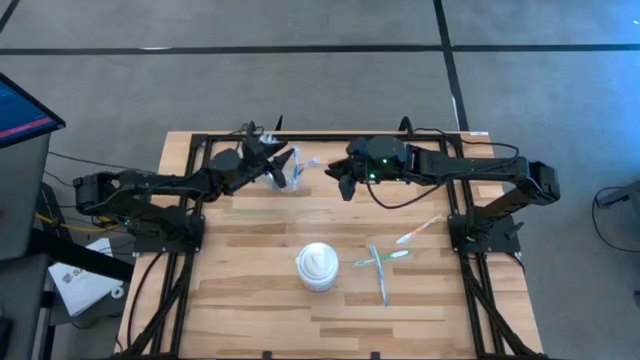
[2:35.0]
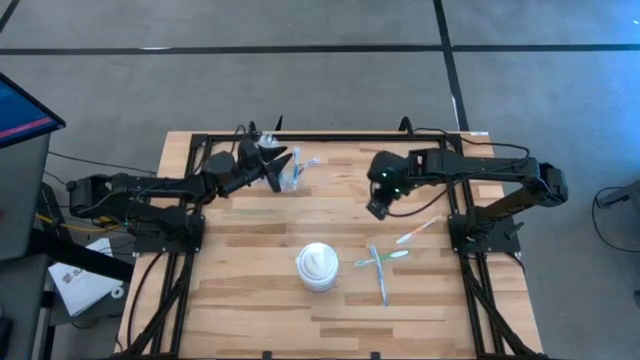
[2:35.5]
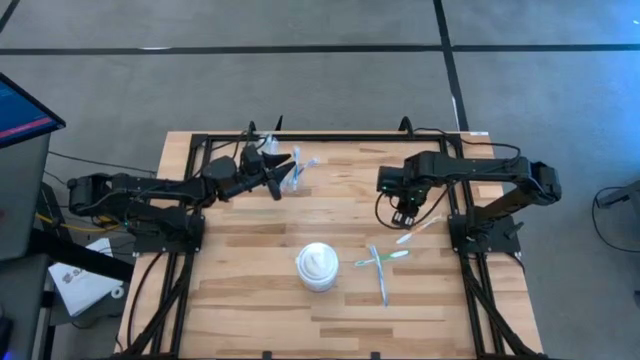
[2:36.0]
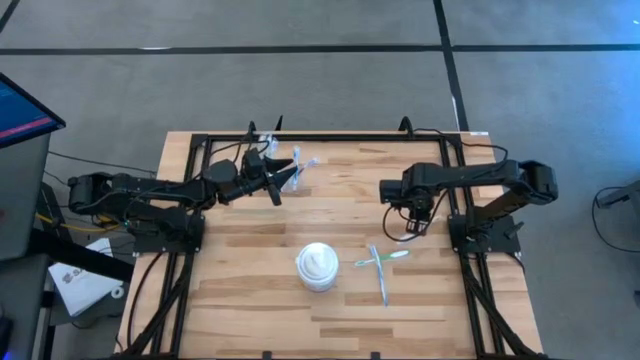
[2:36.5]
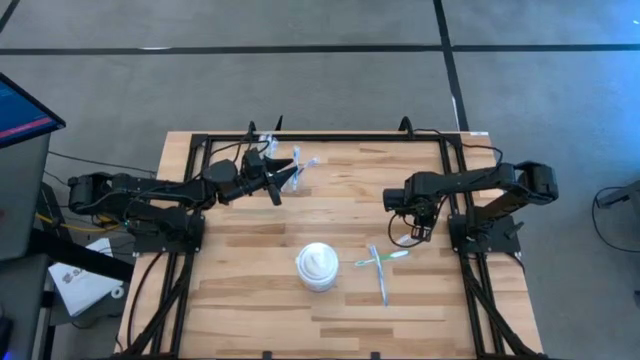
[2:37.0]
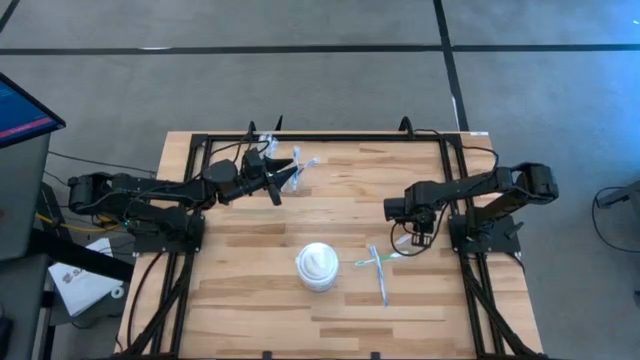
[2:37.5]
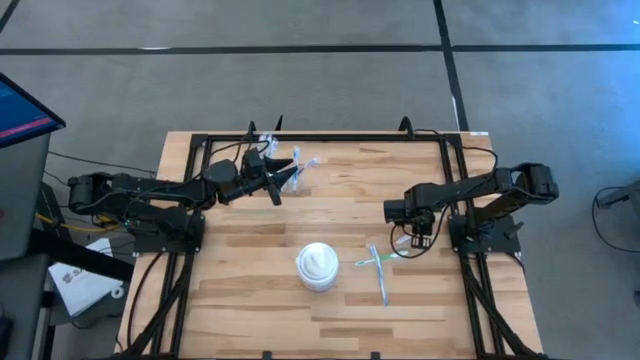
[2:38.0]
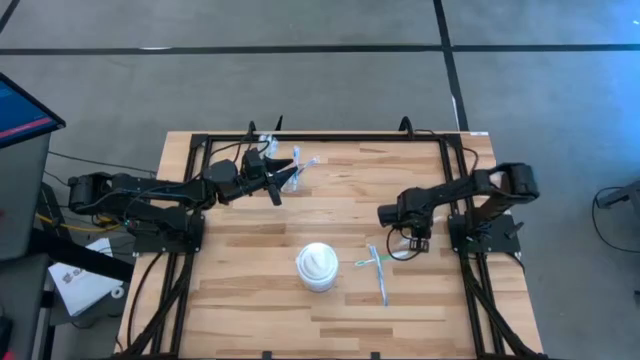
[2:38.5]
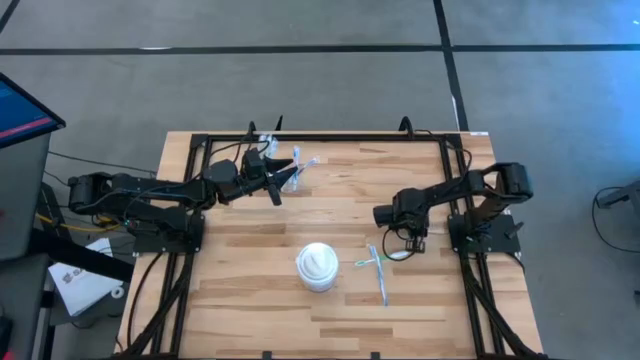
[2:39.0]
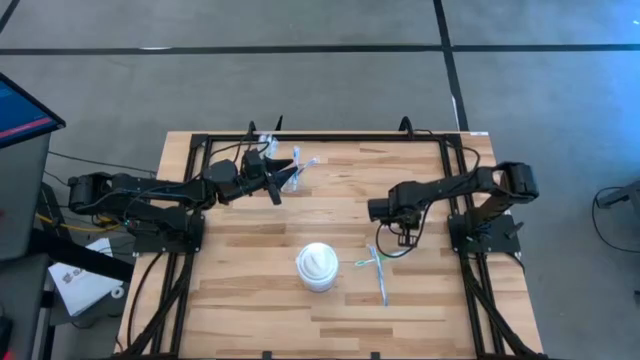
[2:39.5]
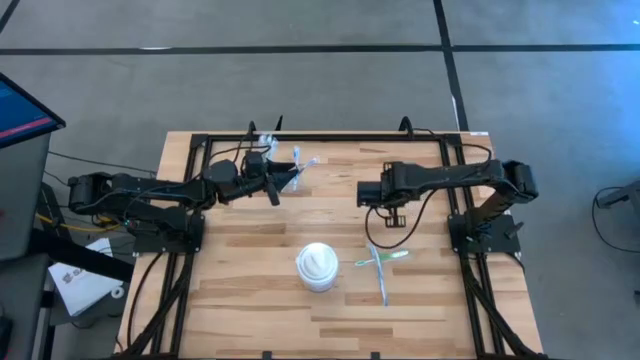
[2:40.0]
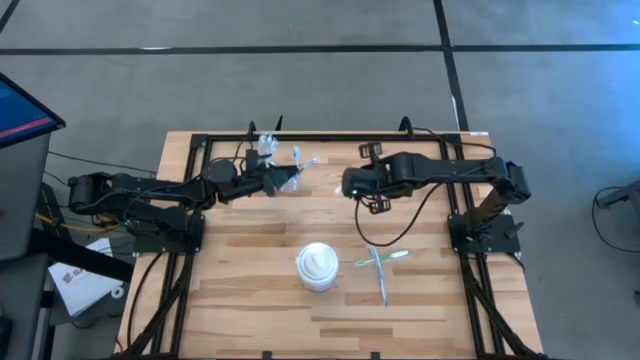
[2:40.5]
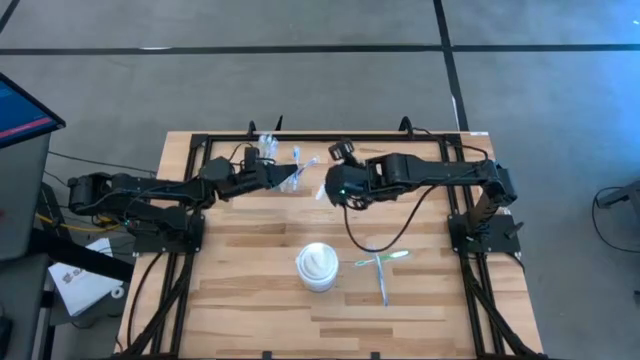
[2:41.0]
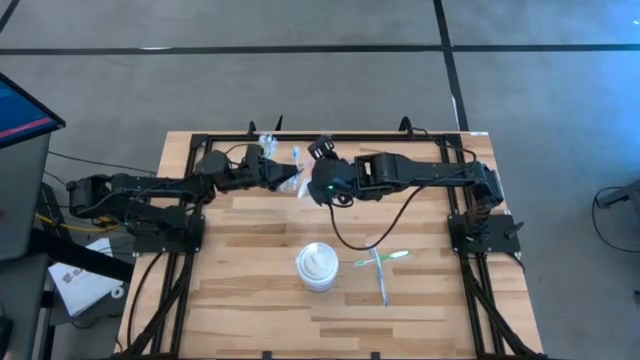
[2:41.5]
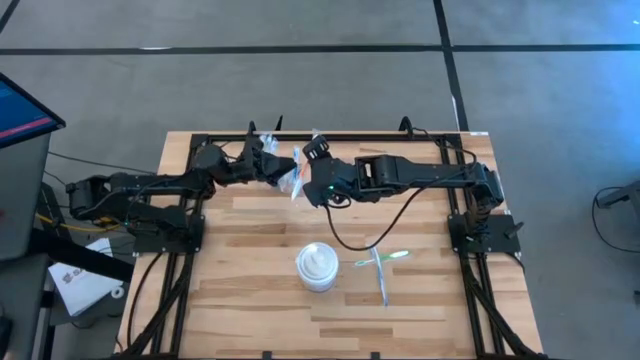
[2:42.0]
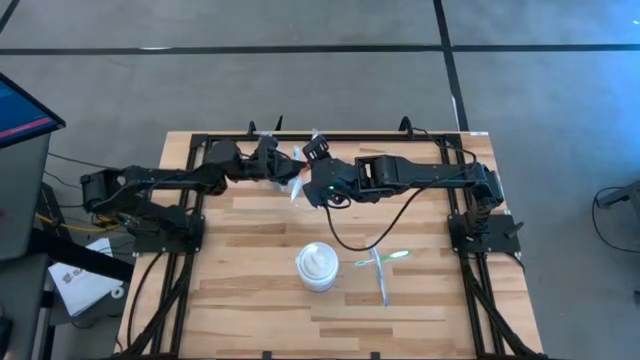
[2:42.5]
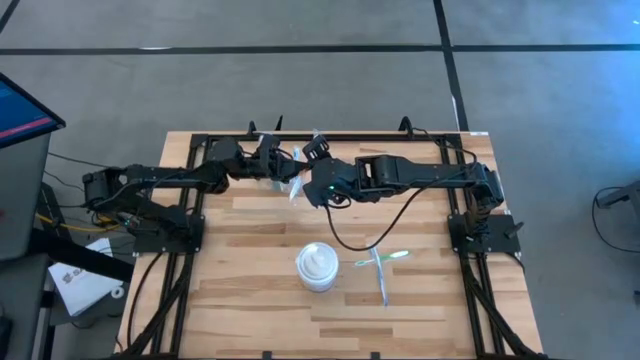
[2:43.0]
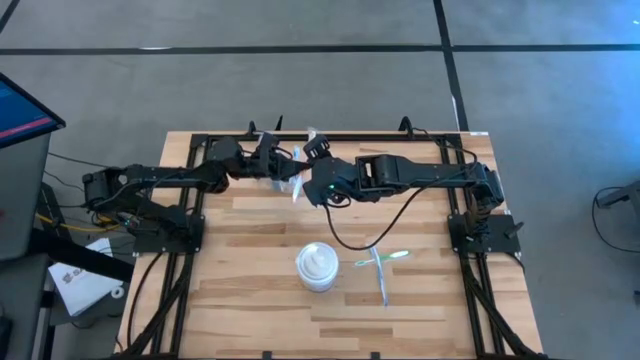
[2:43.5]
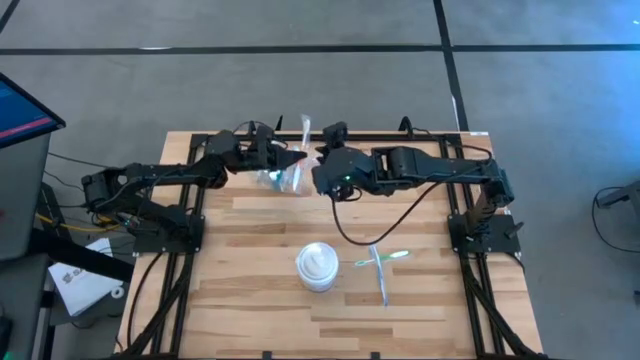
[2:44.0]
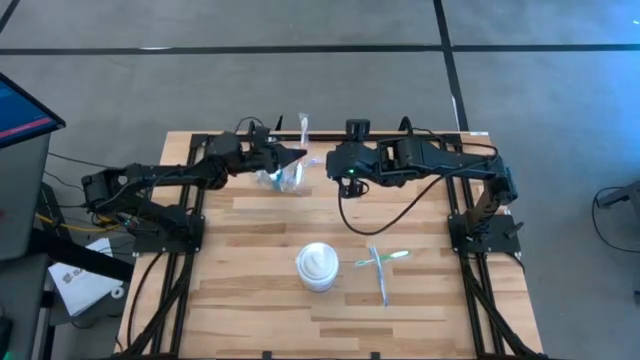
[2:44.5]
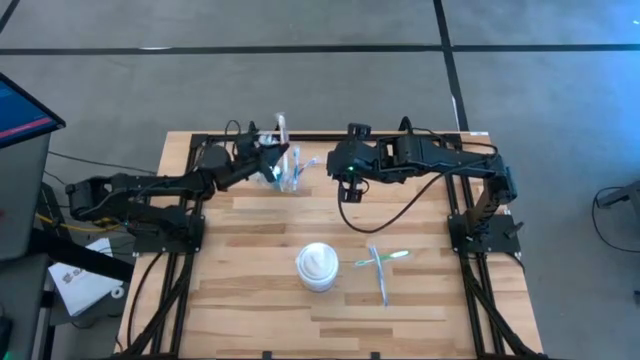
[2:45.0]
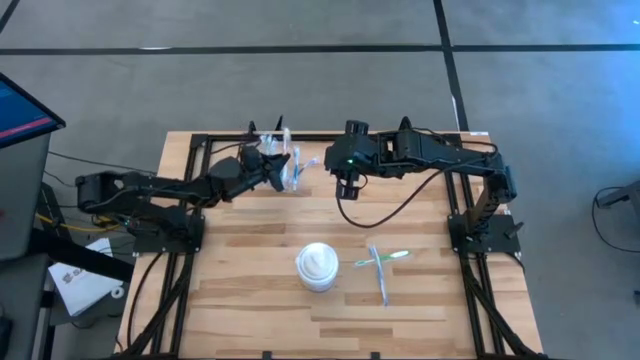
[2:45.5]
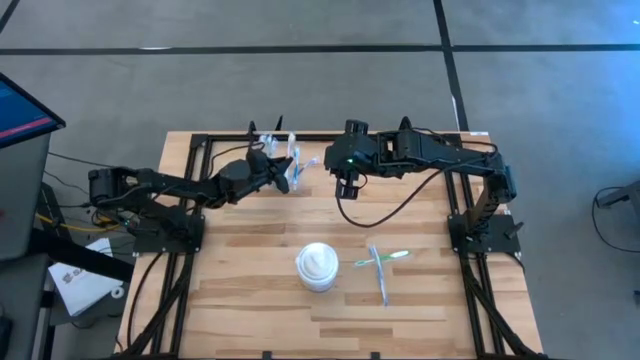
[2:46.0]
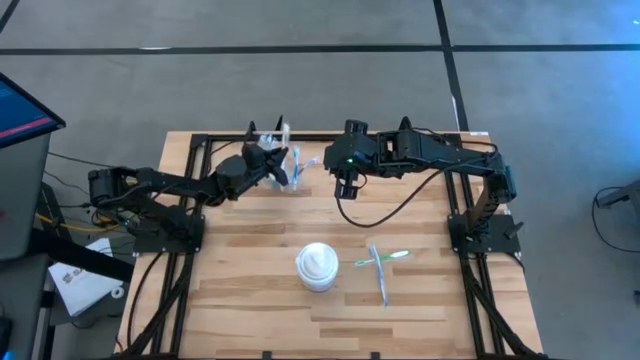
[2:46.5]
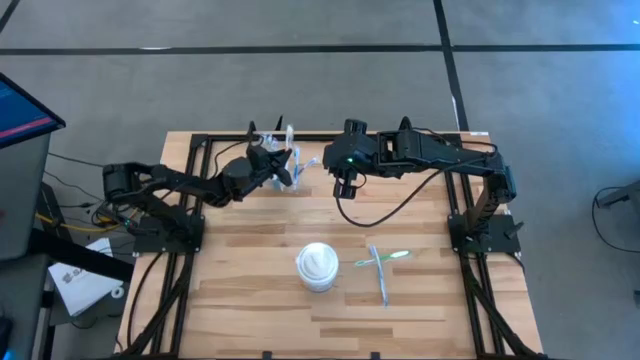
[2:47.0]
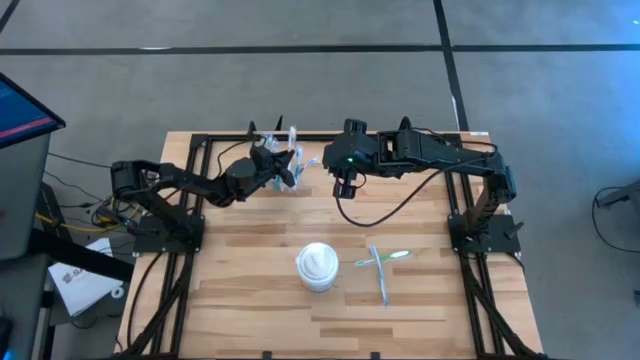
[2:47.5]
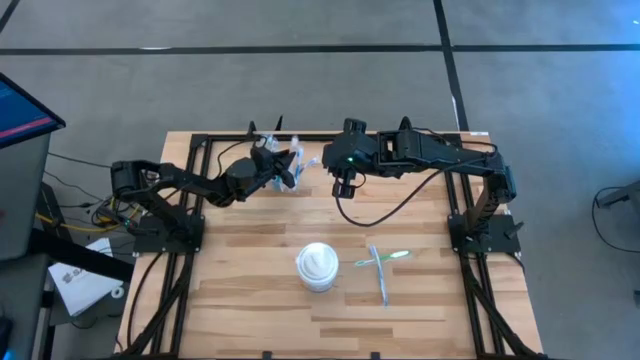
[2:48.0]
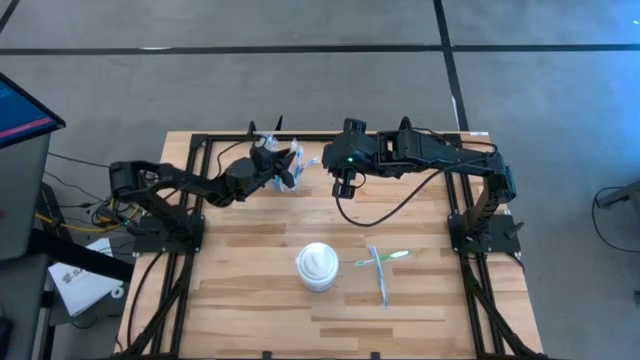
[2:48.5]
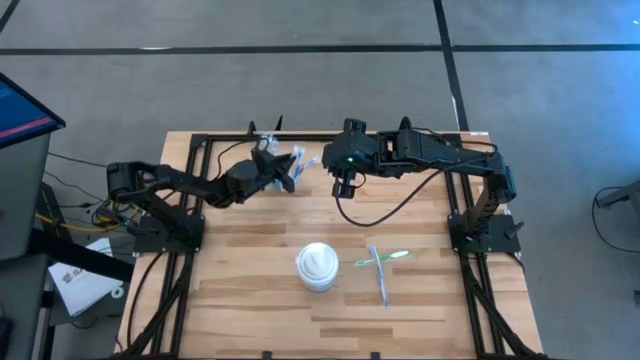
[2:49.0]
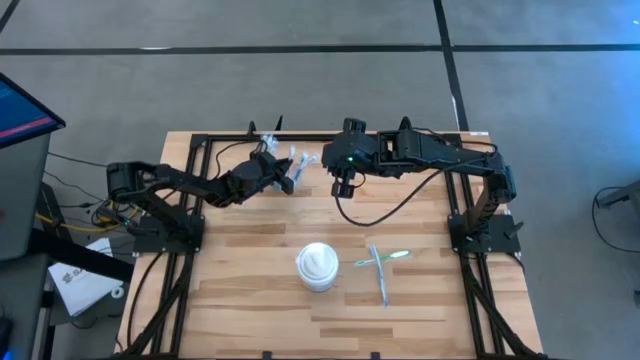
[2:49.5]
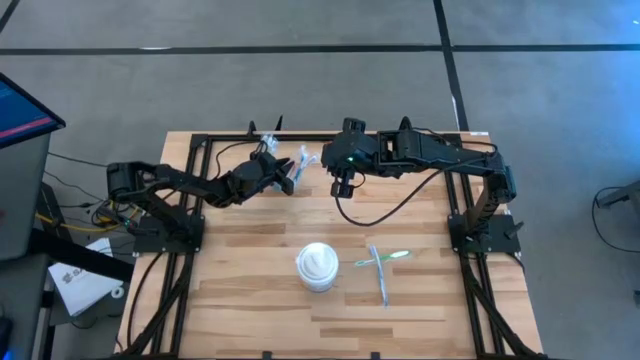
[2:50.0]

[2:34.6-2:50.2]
Task: Pick & Place toothbrushing station
Put the orange toothbrush into the transparent organizer

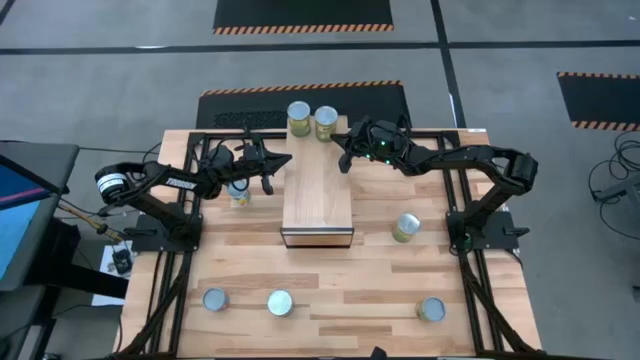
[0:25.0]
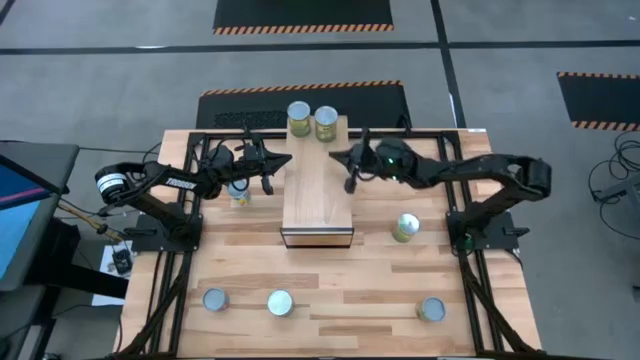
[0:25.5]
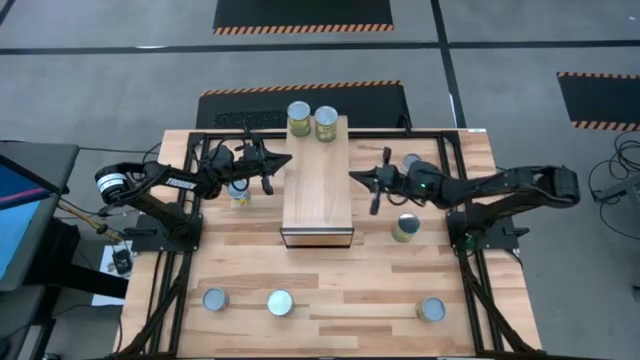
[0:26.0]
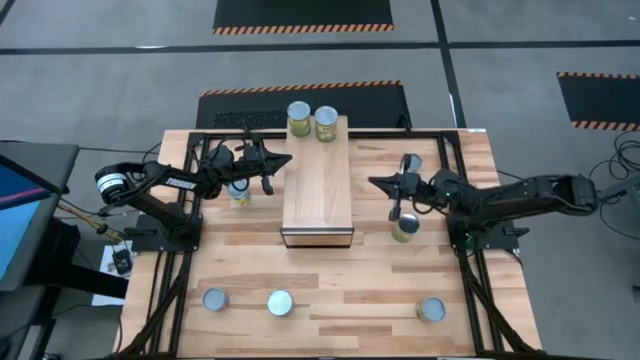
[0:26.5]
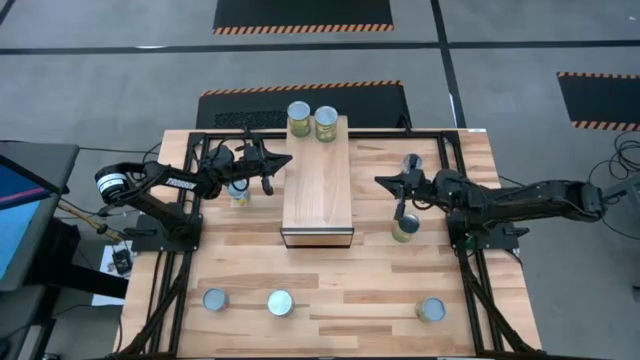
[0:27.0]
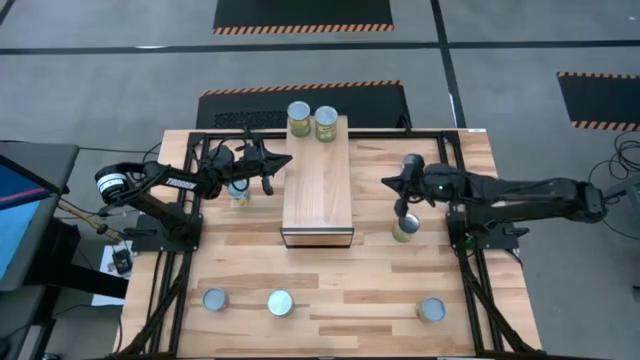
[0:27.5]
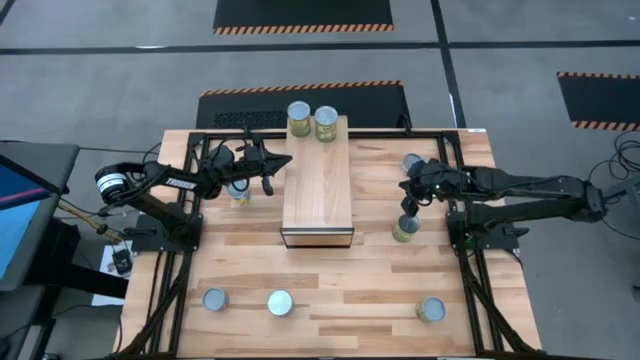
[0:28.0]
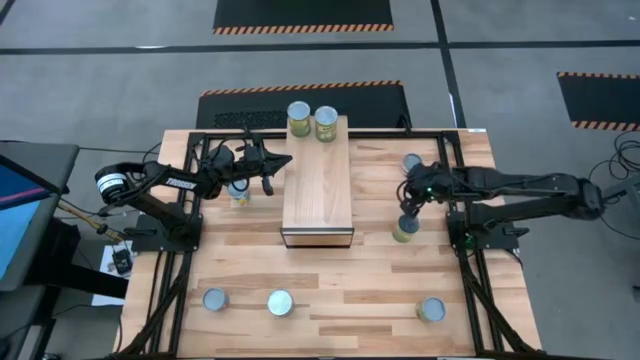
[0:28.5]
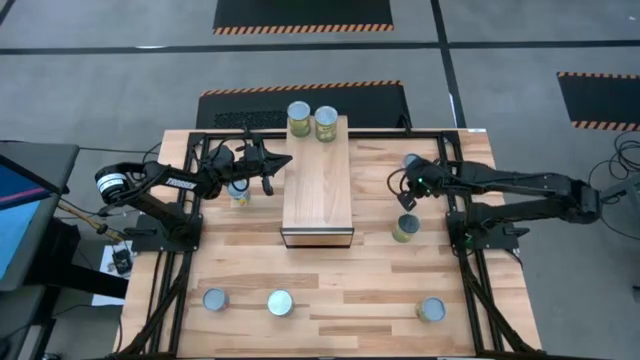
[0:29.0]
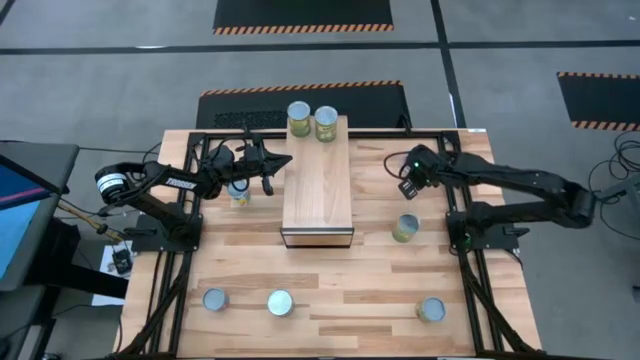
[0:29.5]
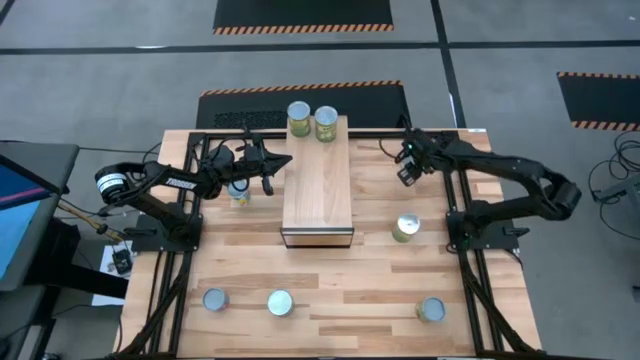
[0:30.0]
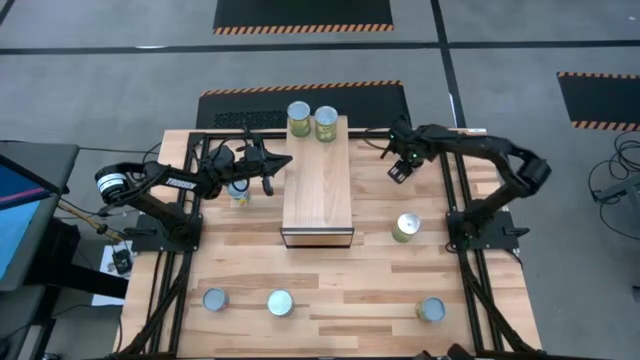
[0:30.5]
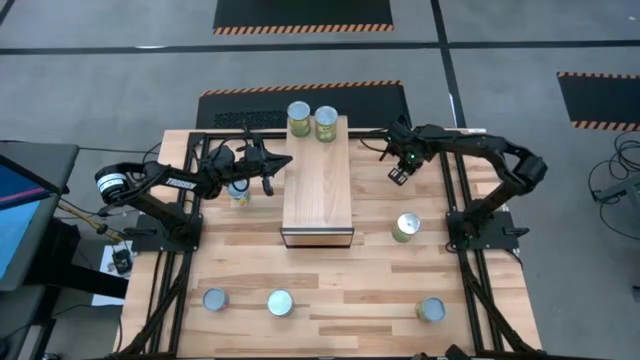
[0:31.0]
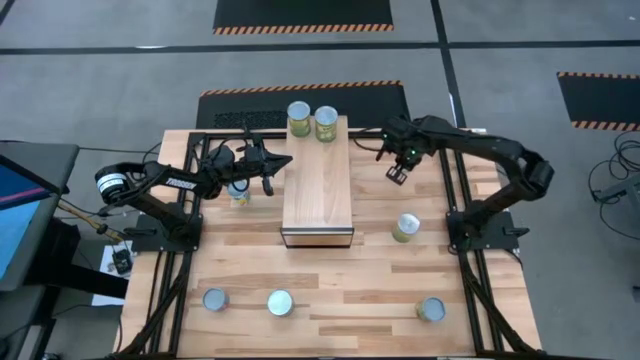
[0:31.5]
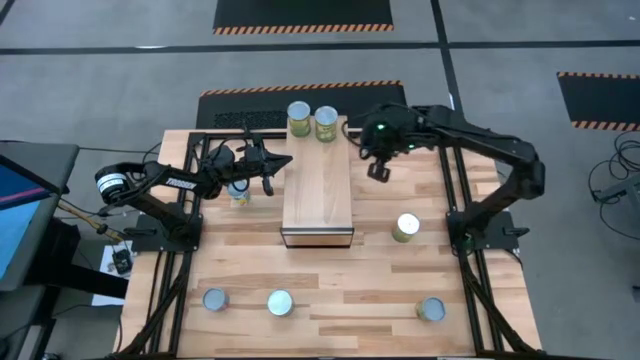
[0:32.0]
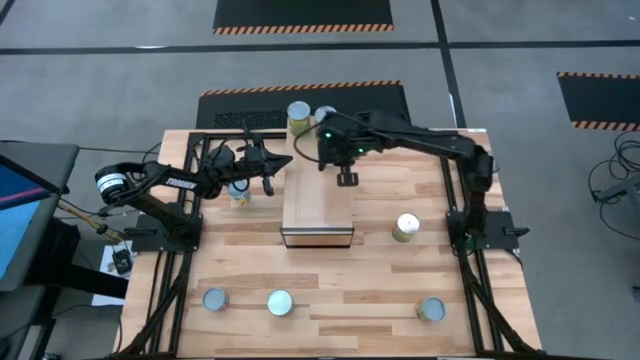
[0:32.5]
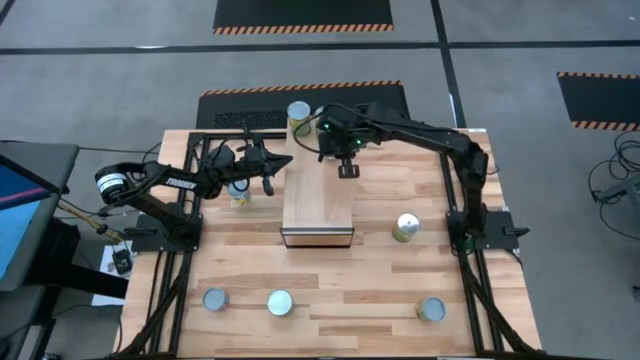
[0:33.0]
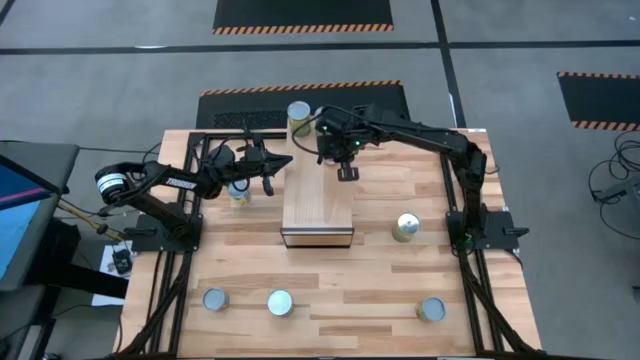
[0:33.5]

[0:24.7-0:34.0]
Task: Pick and place cans onto a shelf
Put the small canned oranges on the shelf
